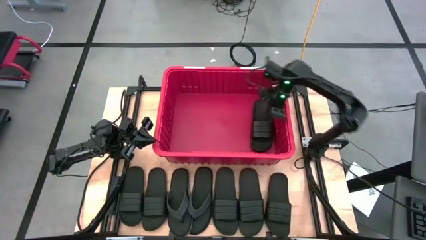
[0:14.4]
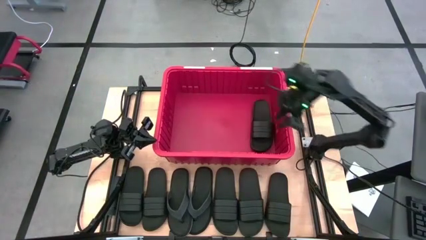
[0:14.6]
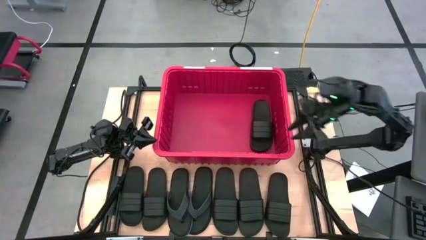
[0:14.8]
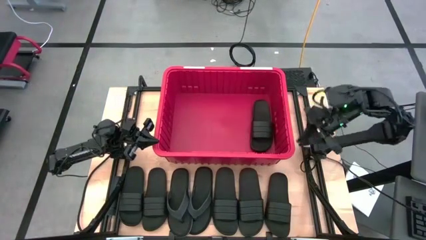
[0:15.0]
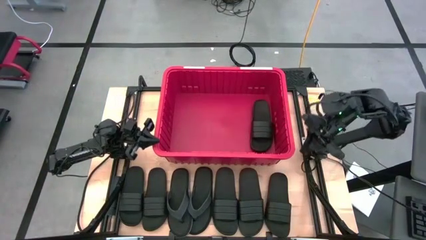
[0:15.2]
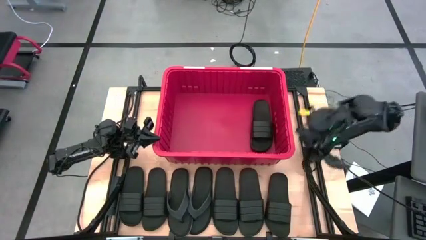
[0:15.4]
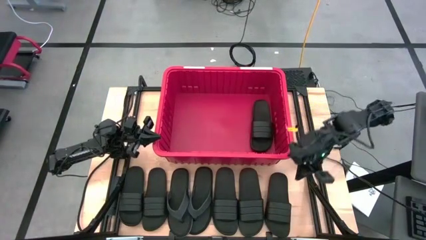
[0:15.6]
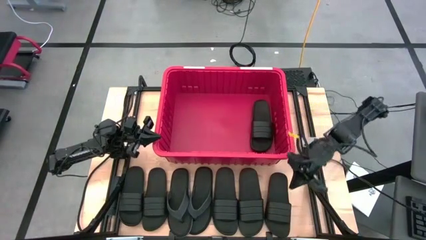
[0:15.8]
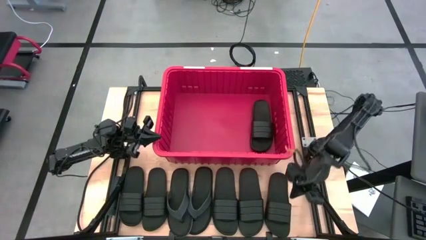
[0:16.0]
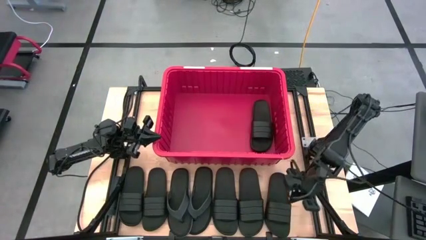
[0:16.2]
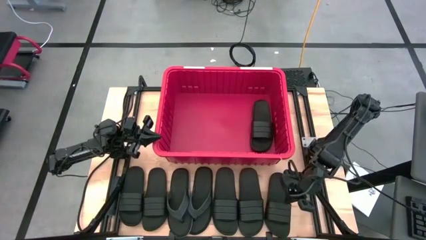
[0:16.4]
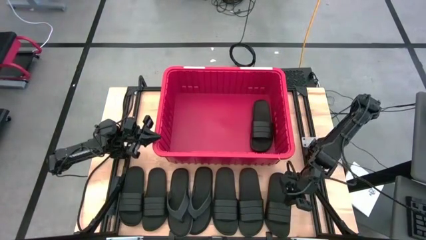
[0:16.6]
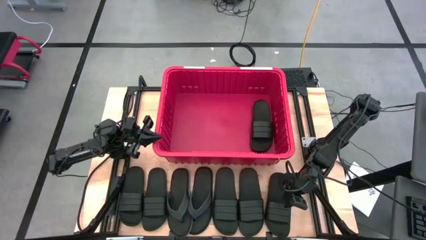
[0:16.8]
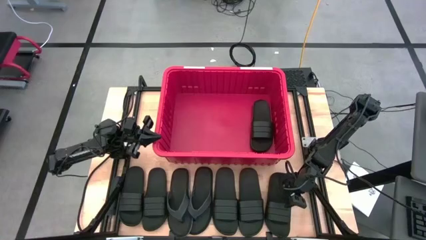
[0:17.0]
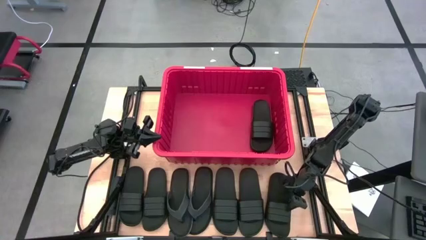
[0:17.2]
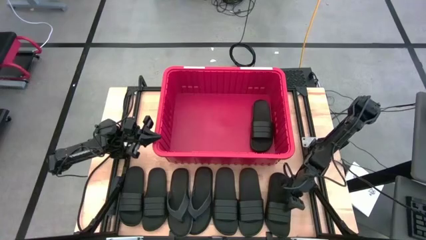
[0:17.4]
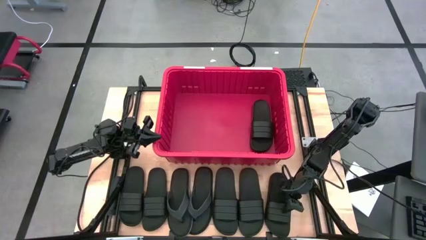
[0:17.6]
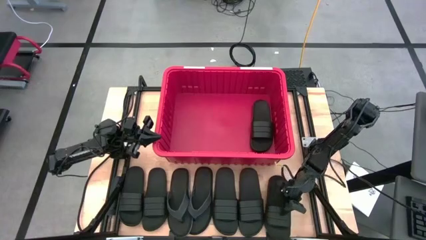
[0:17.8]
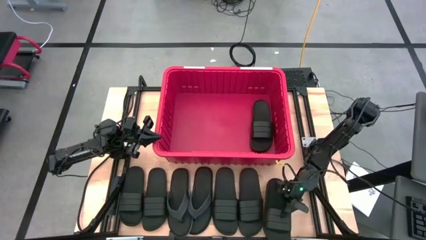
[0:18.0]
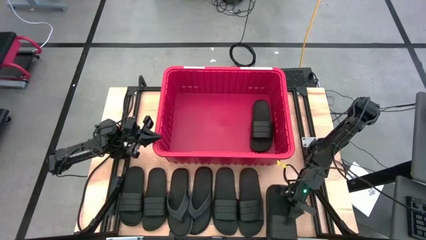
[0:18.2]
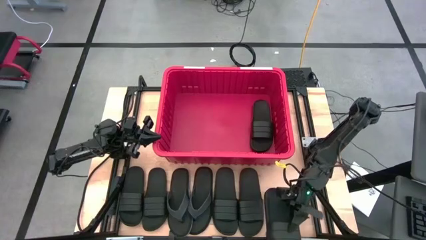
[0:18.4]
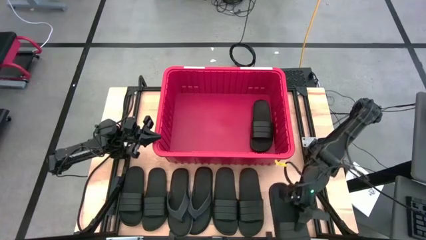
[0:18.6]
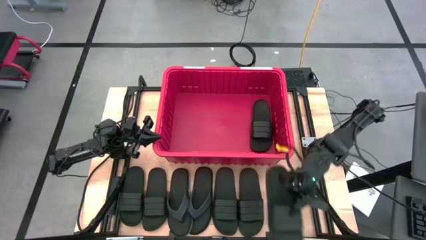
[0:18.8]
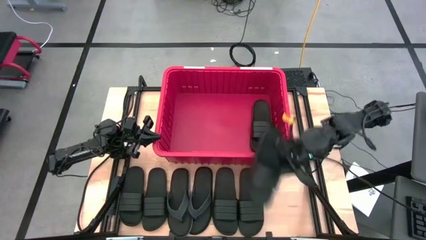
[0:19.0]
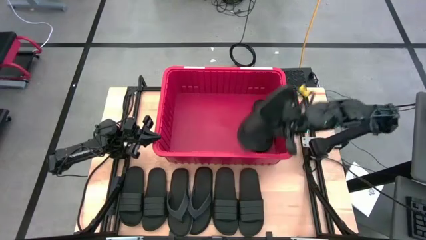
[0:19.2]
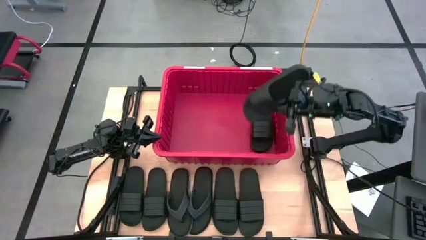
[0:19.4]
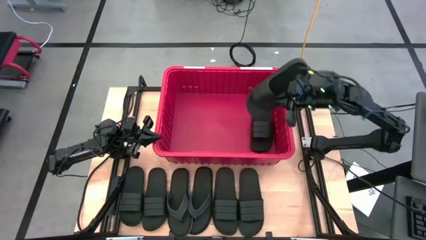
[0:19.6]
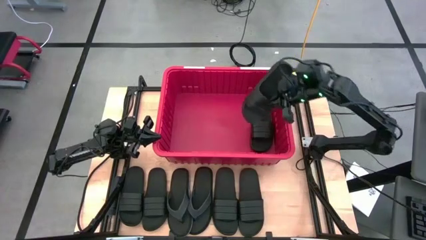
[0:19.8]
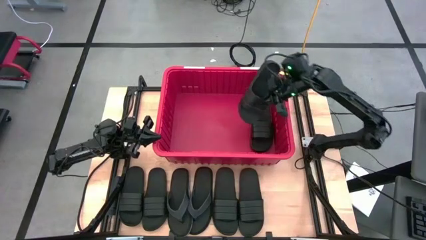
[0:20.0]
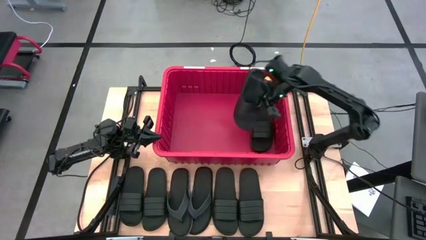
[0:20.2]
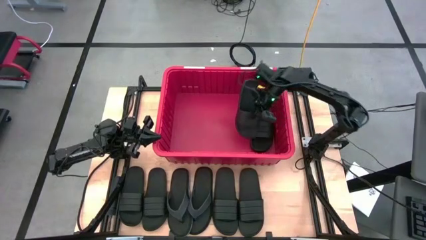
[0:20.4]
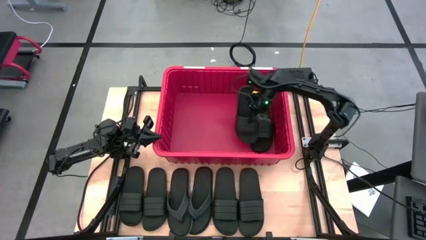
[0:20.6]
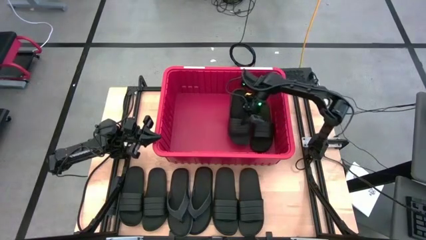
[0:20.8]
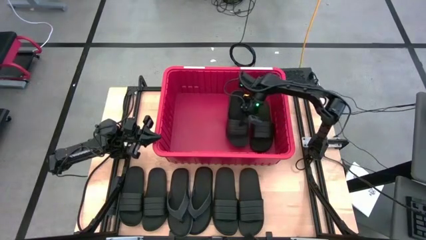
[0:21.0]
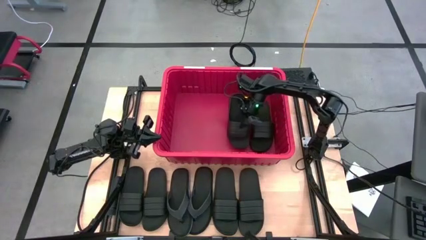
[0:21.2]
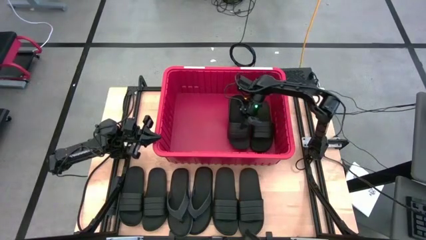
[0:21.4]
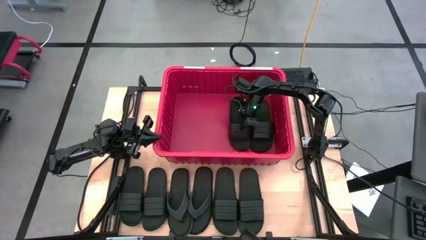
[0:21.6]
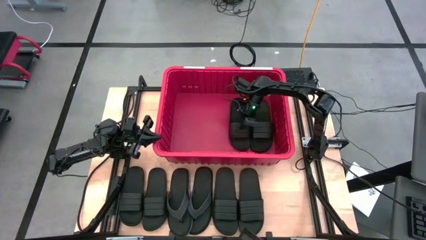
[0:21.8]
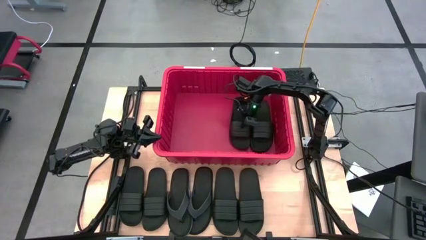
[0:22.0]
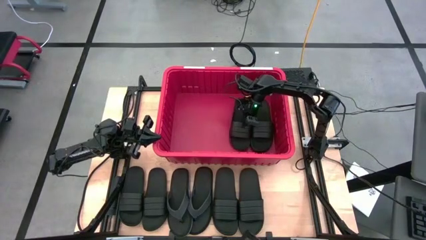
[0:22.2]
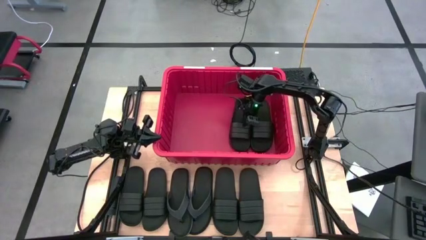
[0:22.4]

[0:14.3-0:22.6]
Task: Pick and place slides into bin
Put the slipper into the bin

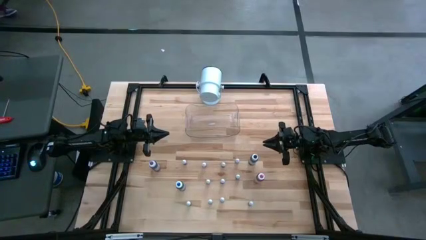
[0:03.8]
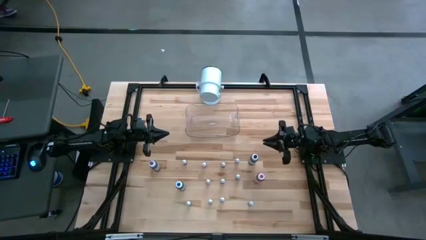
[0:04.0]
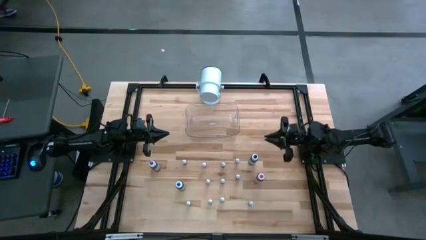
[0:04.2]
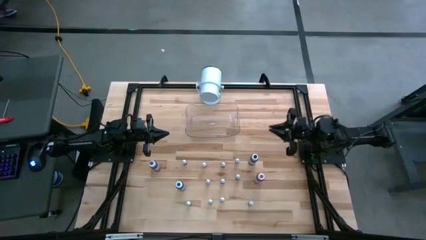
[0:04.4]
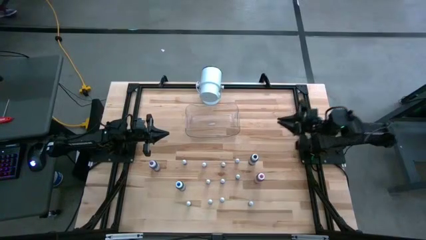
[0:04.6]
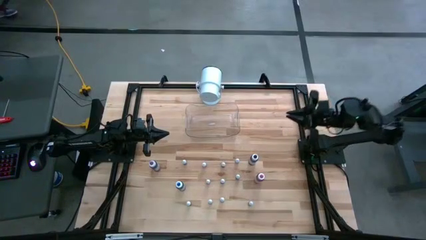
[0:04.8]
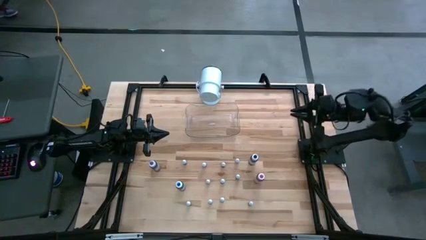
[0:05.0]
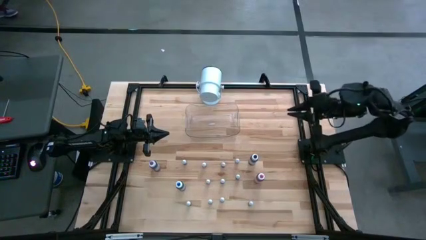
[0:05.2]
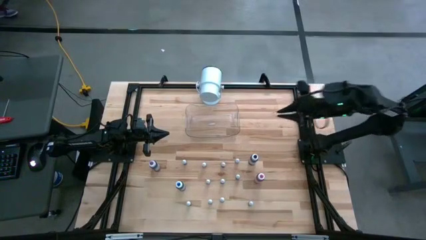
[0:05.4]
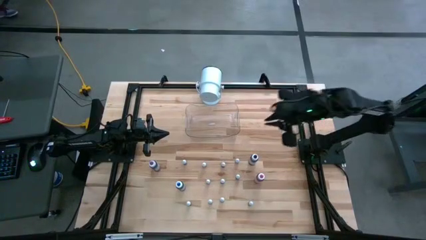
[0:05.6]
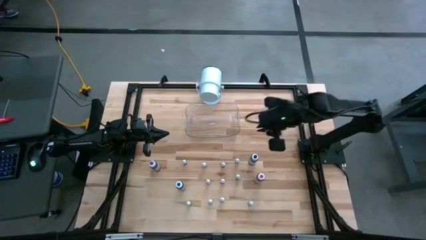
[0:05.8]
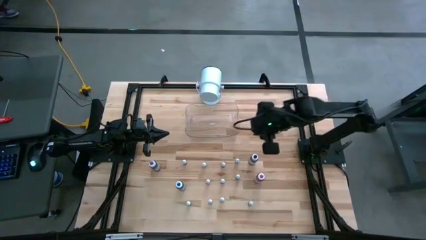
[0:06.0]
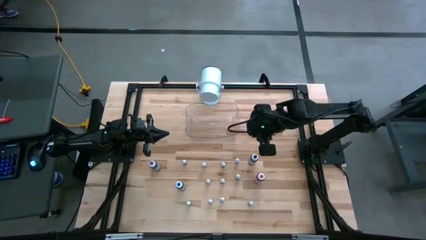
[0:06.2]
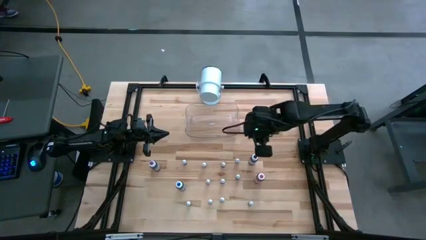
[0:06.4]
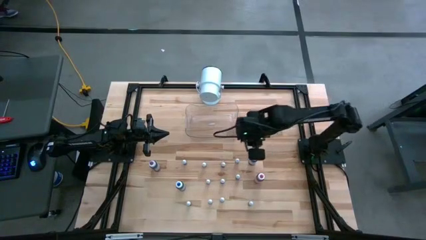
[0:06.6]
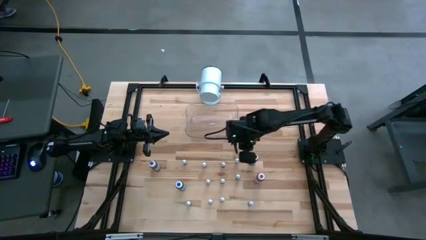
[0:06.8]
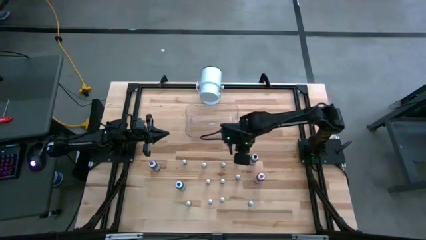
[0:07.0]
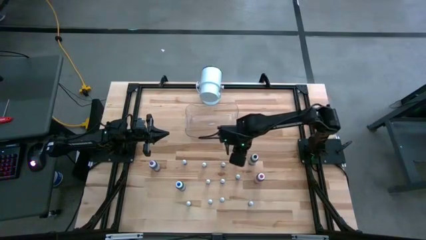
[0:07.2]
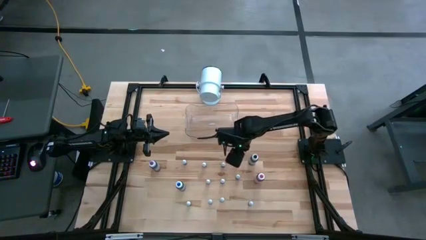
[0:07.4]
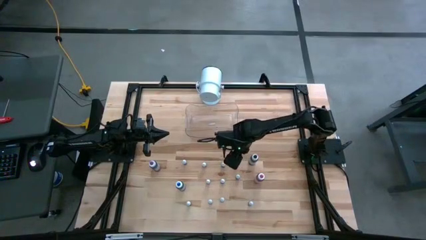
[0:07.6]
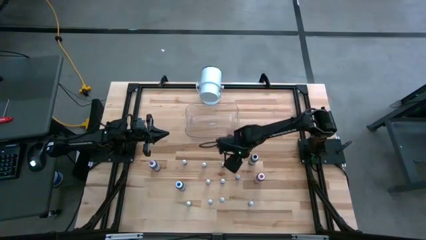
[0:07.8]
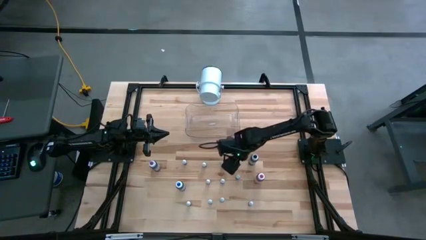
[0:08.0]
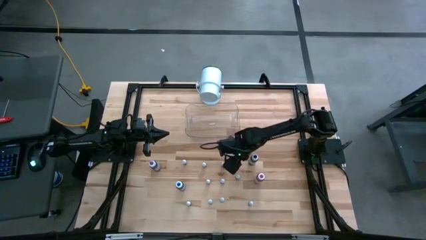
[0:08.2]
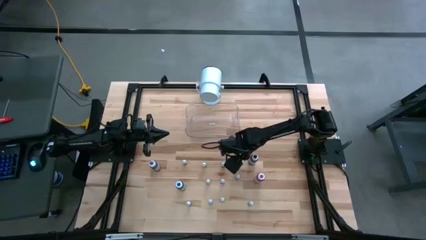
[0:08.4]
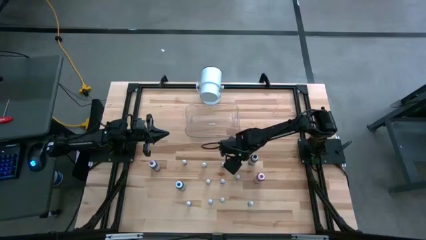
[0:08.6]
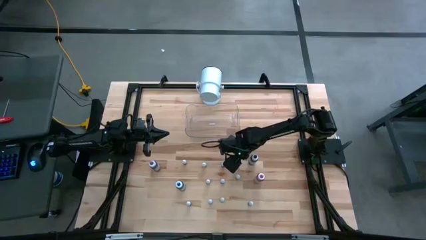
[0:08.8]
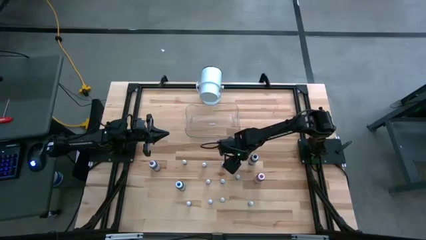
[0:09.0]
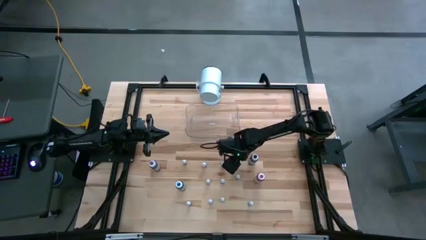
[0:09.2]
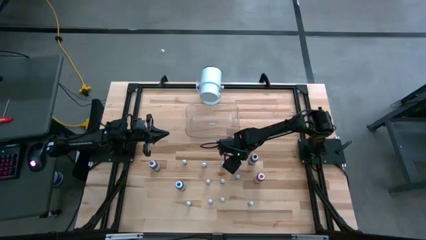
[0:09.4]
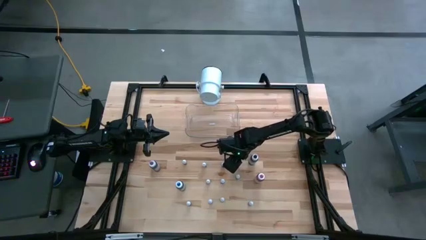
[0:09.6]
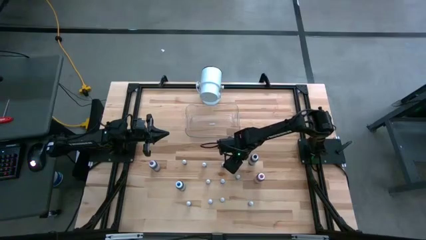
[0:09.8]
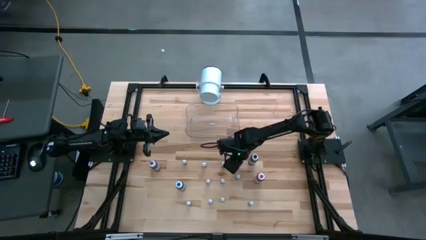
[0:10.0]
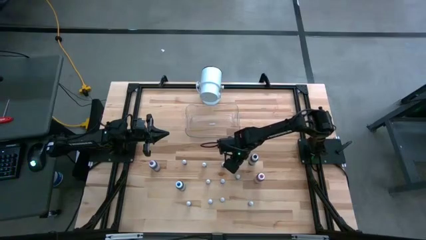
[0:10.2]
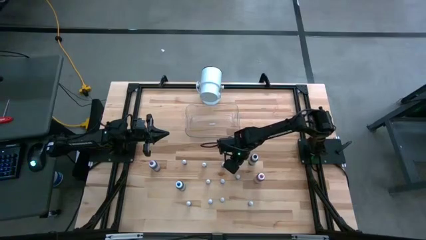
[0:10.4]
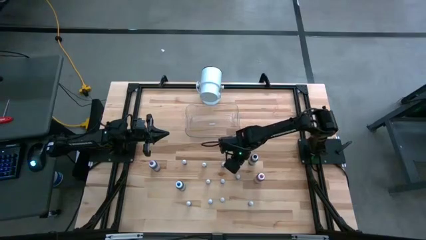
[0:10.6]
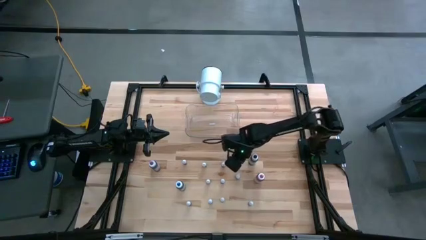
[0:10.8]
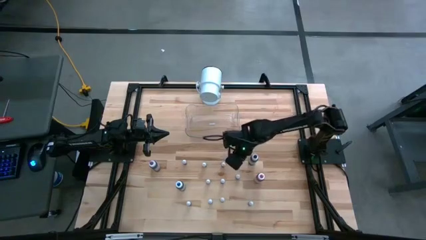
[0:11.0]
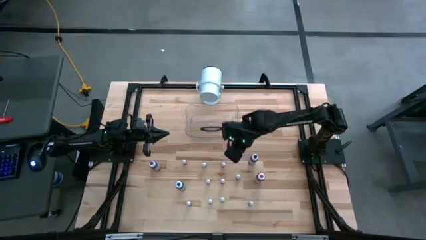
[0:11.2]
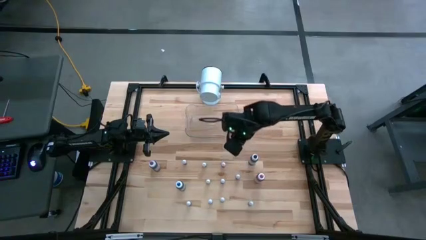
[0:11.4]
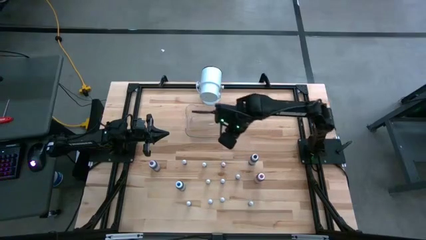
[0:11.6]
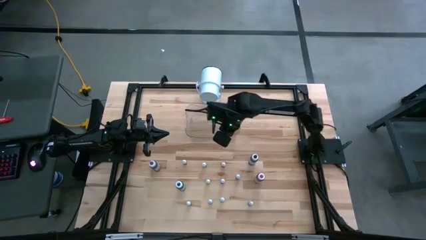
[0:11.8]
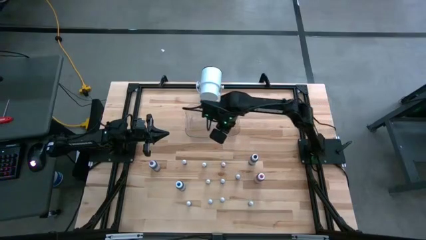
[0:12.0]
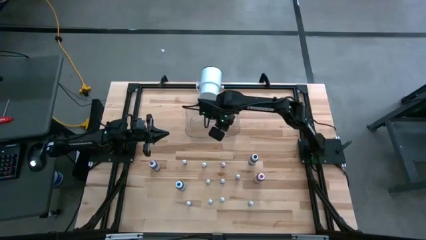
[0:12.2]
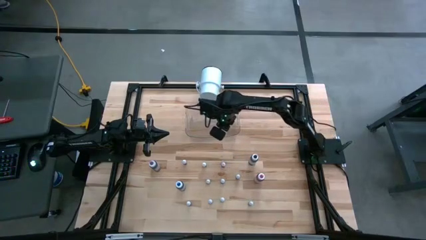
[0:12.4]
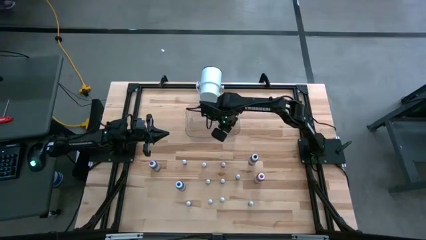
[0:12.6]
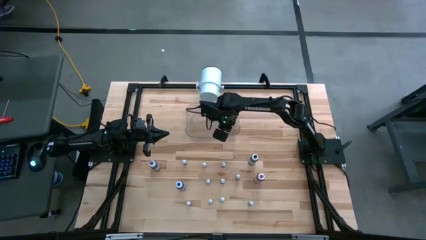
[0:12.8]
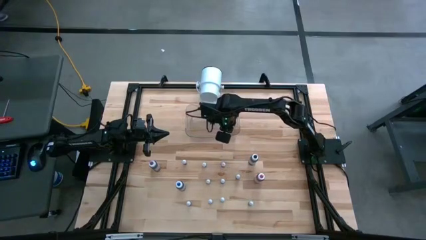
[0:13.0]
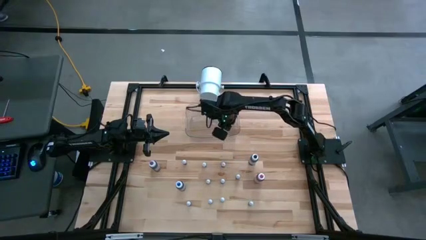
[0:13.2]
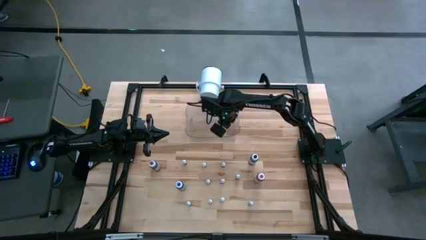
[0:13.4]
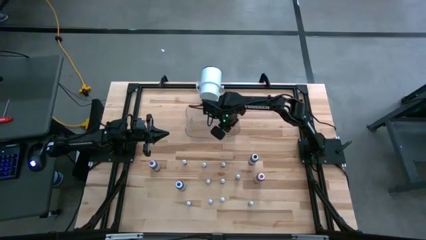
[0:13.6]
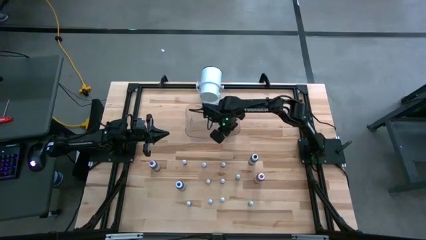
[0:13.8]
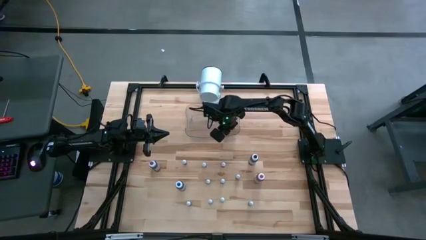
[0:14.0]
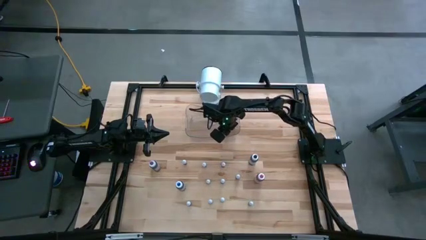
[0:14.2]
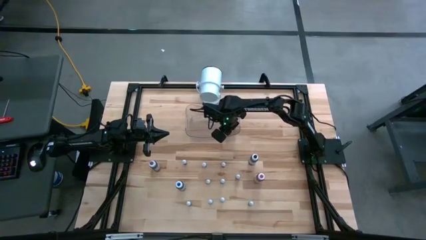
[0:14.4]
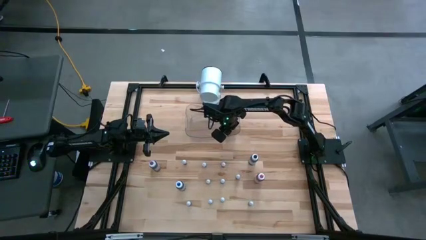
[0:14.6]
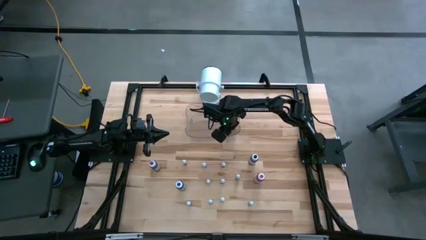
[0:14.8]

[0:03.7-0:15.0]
Task: Pick & Place food coloring
Put the top right small green food coloring bottle into the transparent bin
